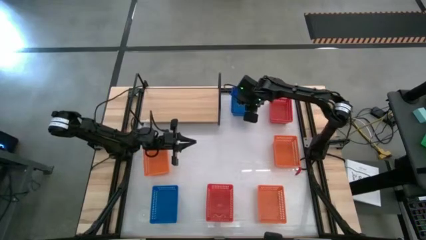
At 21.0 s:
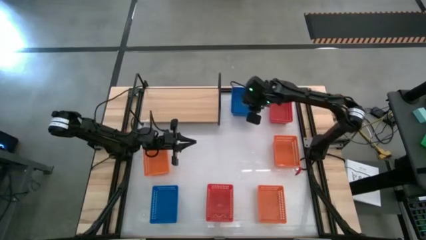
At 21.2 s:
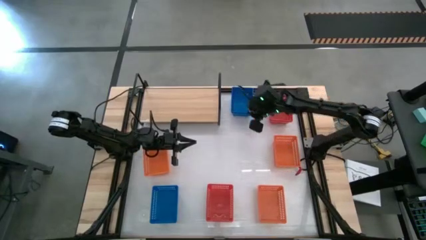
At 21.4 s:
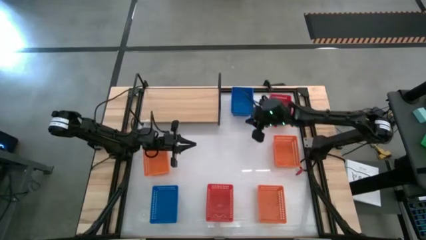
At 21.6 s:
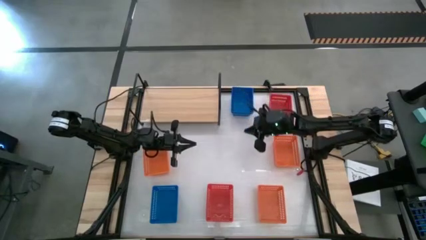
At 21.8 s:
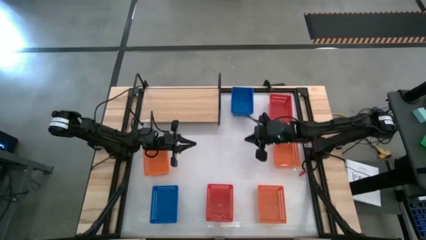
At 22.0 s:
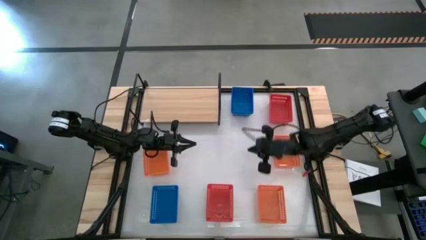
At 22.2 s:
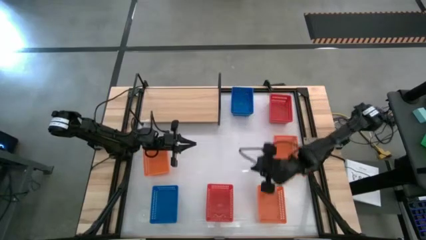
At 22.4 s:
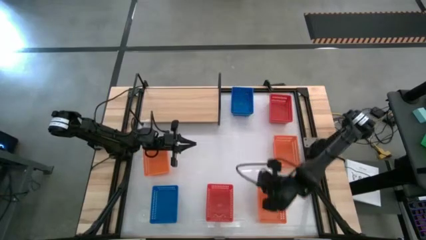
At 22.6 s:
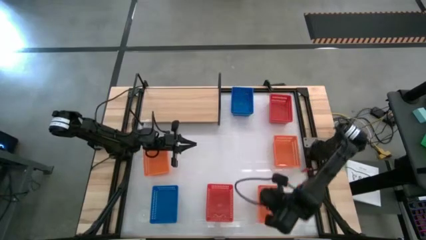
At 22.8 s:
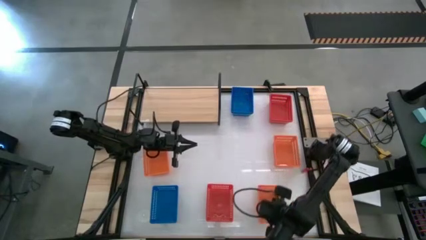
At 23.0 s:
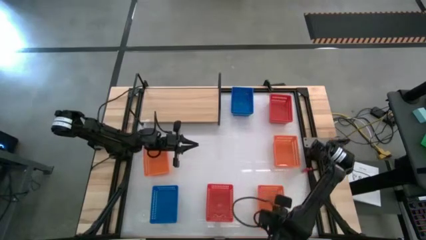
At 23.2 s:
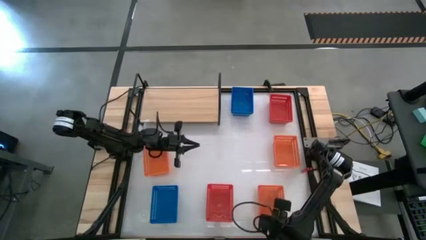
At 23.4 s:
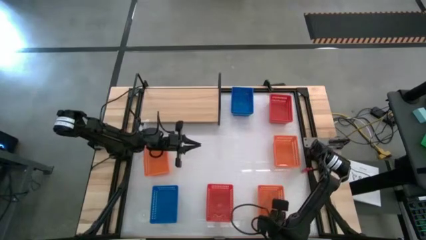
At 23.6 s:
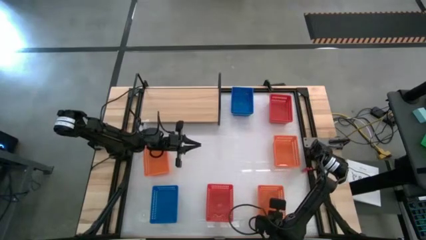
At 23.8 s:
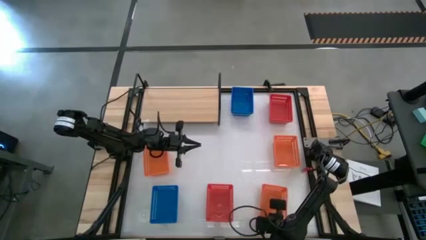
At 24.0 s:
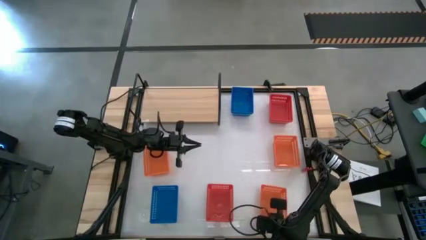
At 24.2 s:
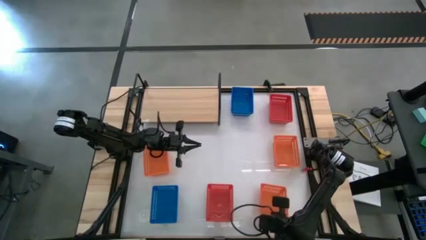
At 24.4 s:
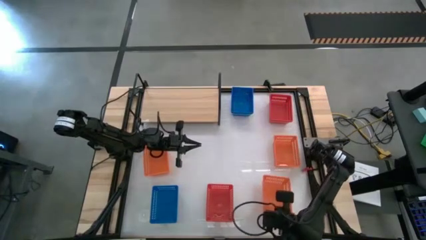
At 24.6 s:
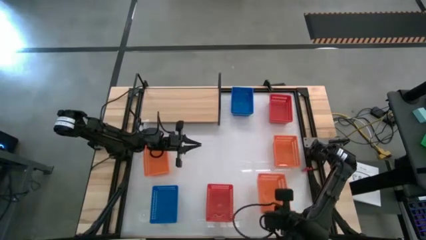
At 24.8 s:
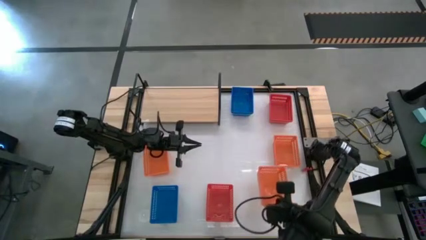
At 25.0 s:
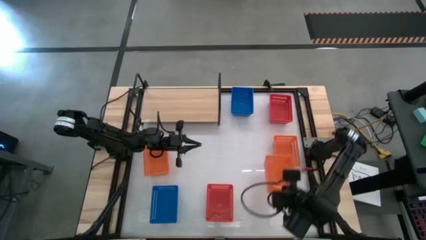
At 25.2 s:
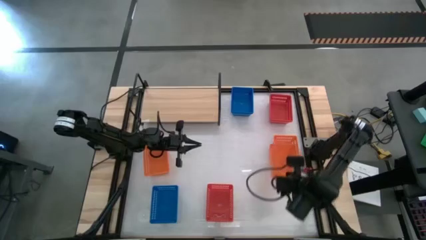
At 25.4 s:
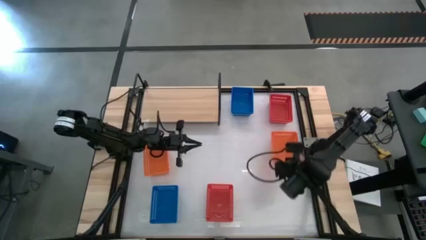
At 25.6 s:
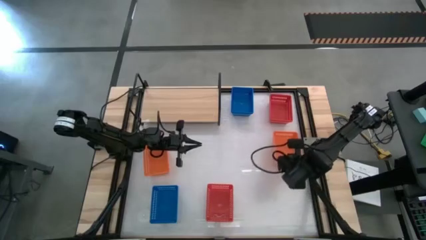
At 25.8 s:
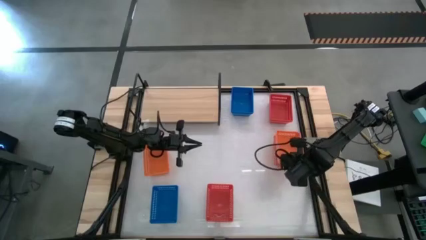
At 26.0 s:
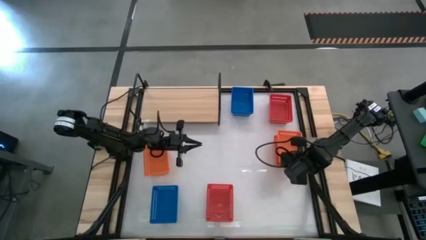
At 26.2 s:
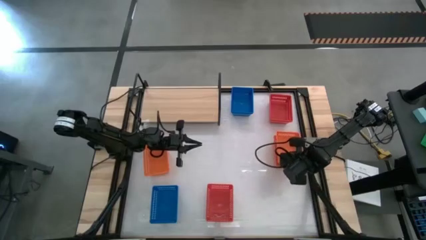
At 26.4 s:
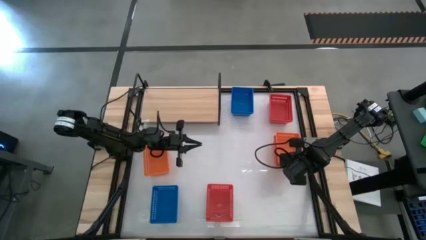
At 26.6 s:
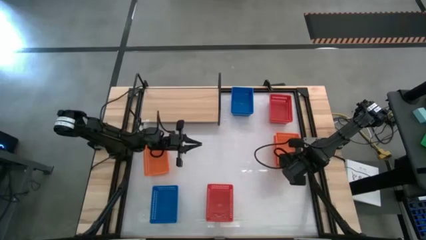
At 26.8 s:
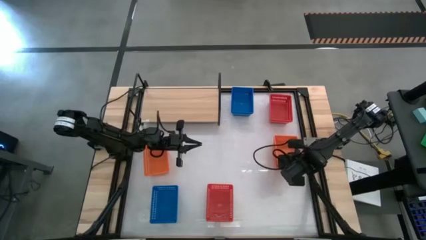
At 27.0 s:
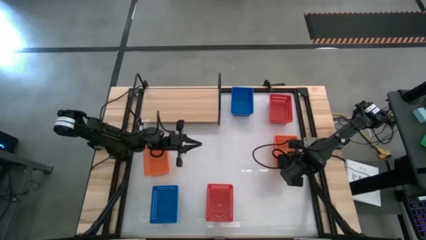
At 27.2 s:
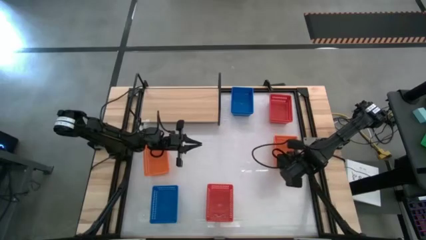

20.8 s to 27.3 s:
Task: Stack baskets on shelf by color
Stack the bottom right orange bin on top of the top right orange bin

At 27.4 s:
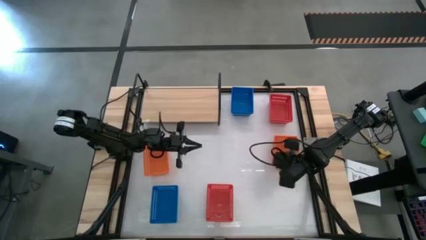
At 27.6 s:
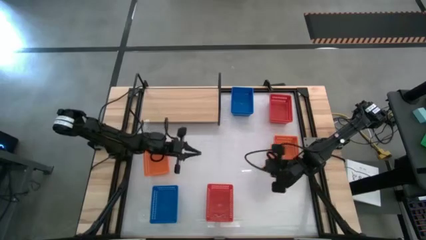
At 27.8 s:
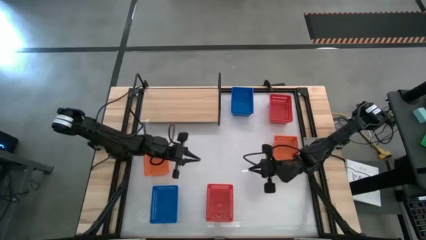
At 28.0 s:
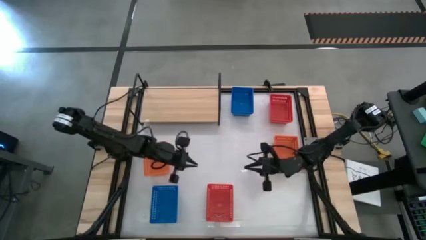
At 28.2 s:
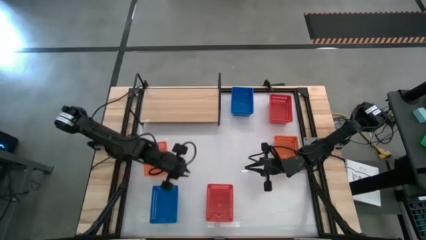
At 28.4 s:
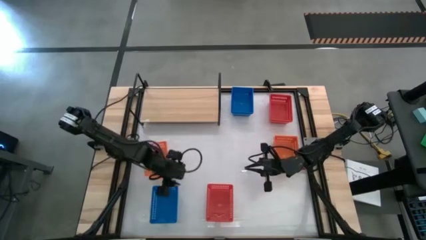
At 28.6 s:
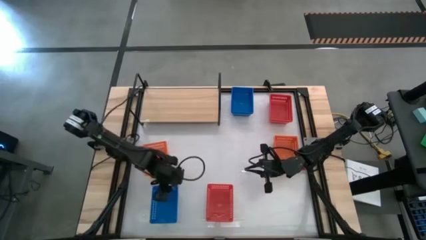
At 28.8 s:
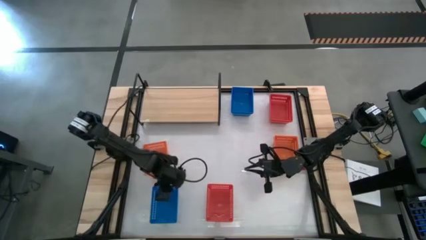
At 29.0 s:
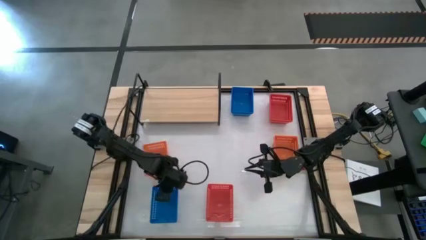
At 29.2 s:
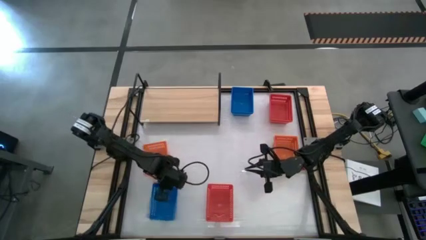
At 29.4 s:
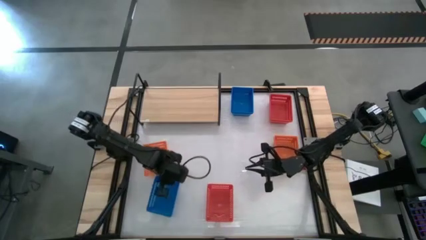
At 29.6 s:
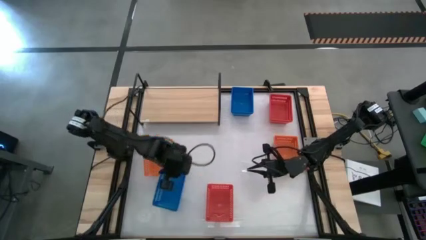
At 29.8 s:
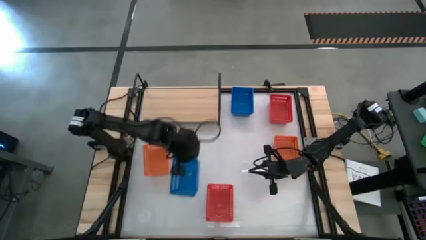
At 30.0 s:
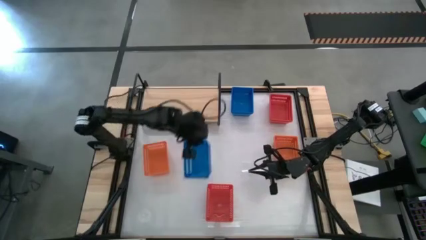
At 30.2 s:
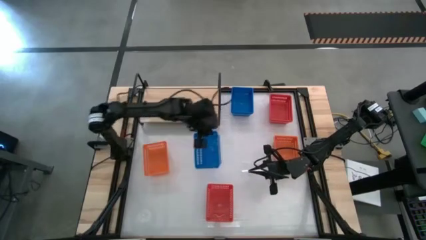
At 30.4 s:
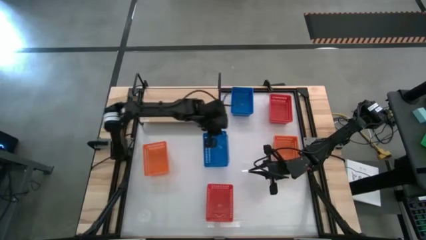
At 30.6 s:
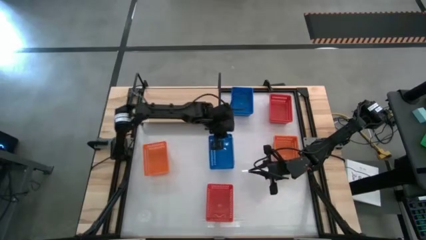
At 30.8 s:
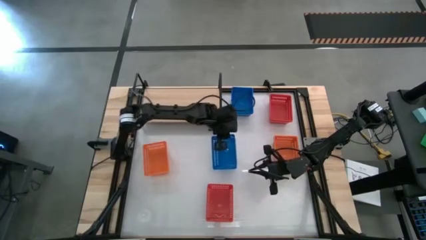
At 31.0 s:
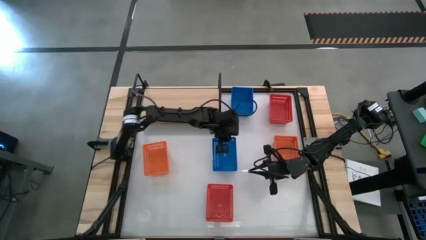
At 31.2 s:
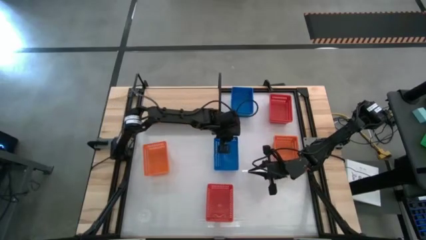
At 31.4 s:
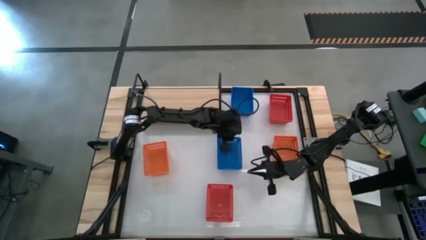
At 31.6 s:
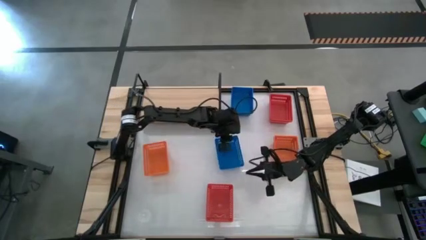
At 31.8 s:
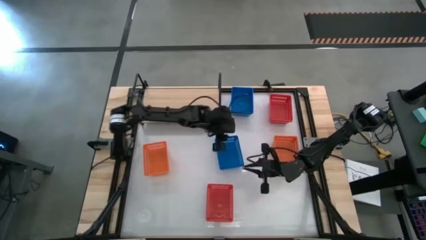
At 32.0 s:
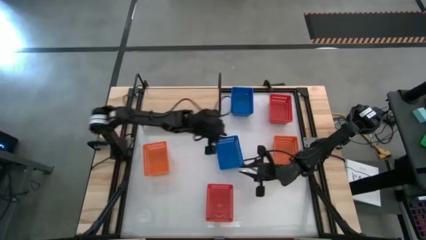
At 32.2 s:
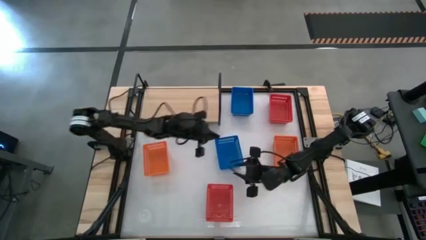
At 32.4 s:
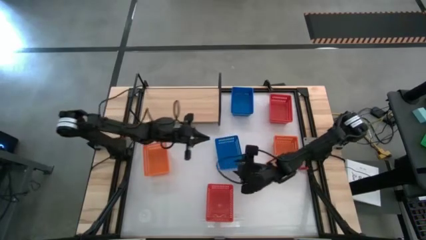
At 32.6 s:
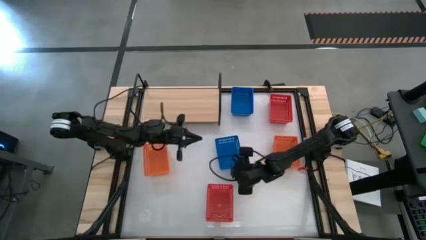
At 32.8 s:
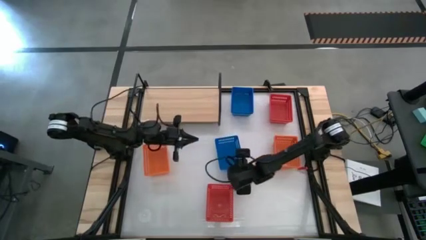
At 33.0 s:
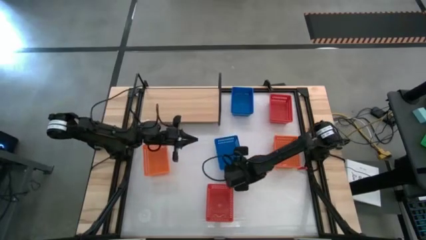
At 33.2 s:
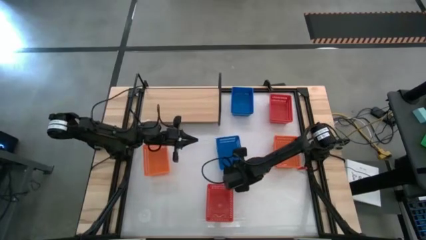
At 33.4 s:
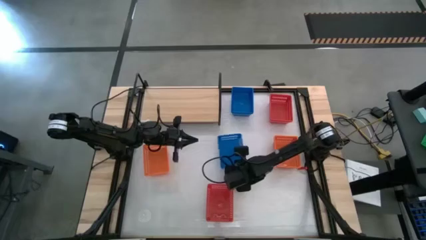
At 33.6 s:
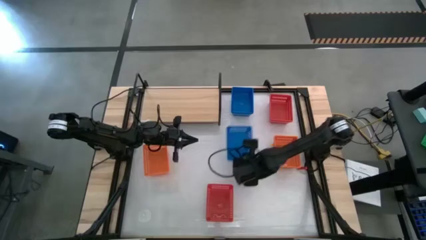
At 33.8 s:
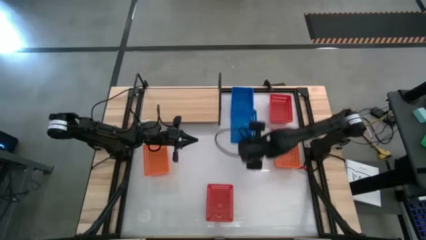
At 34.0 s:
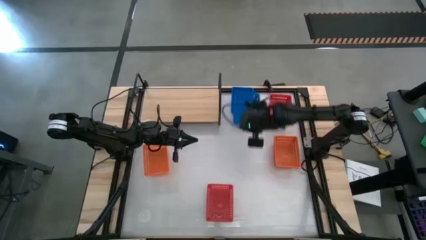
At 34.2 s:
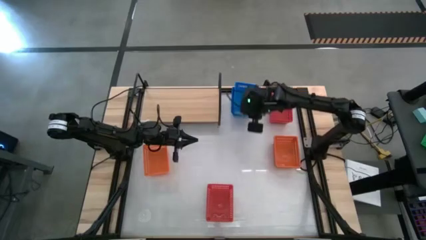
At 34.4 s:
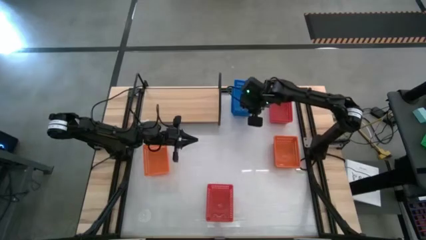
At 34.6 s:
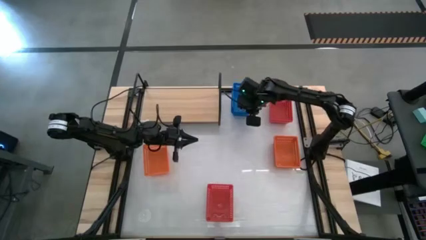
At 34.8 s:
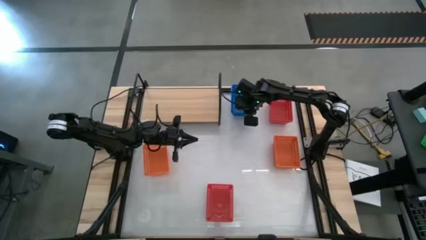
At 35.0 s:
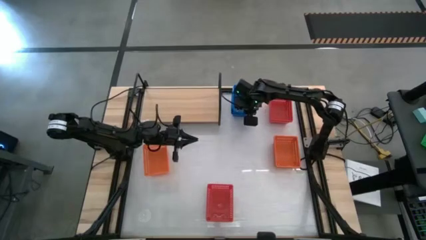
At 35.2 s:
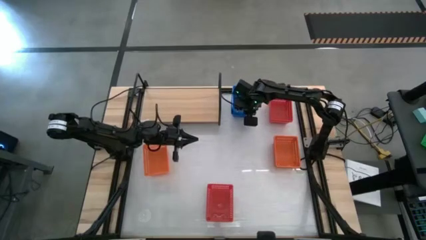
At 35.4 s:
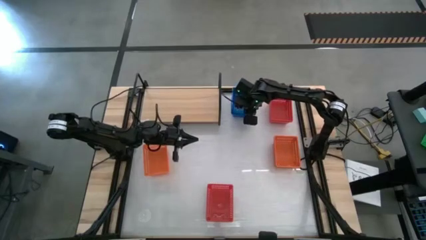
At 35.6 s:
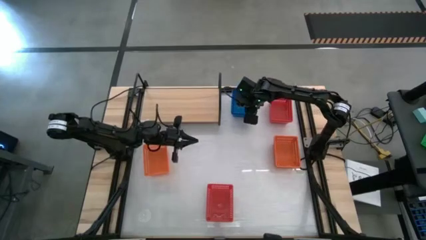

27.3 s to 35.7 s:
Stack the bottom blue bin on top of the top blue bins

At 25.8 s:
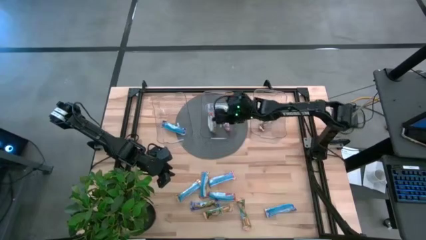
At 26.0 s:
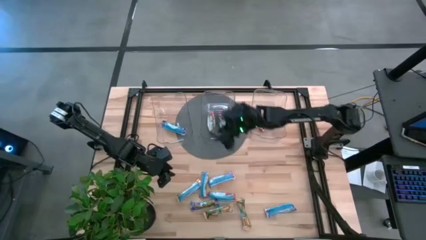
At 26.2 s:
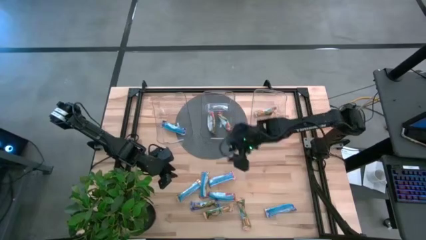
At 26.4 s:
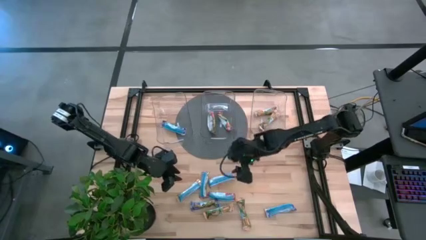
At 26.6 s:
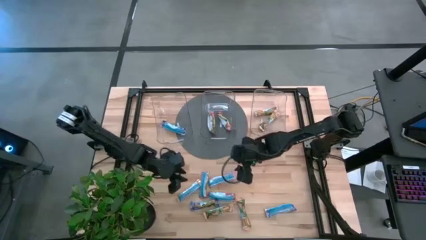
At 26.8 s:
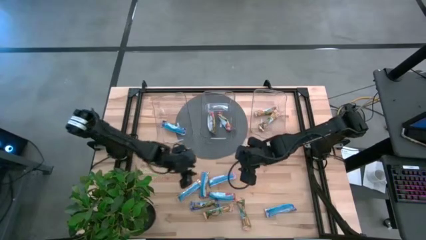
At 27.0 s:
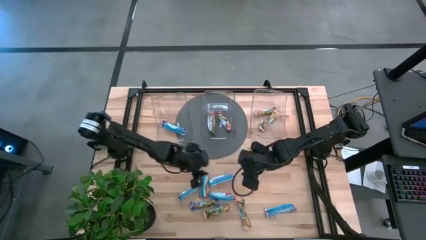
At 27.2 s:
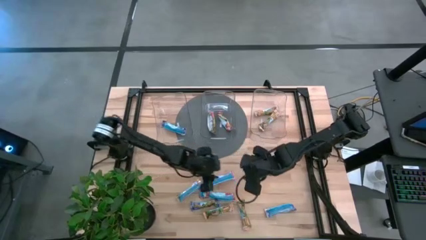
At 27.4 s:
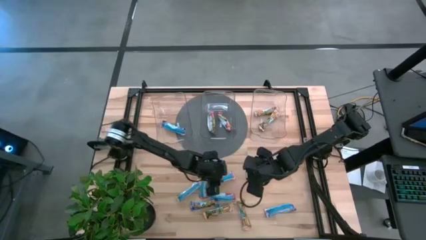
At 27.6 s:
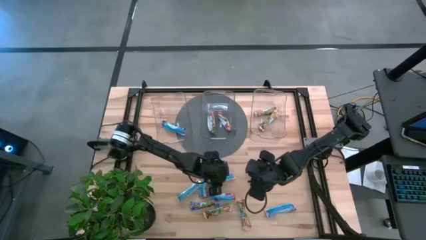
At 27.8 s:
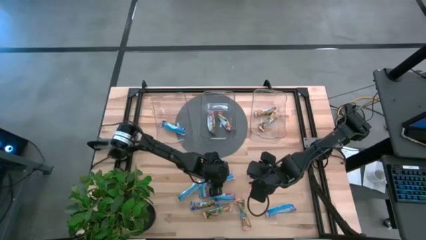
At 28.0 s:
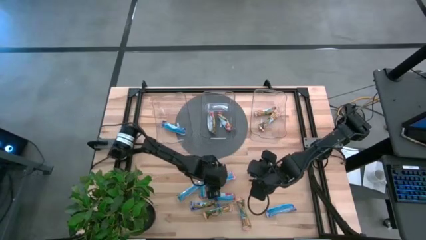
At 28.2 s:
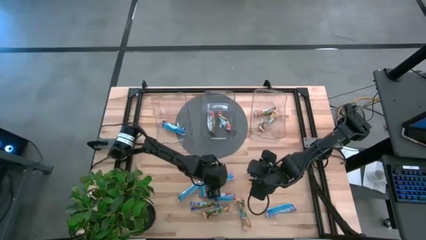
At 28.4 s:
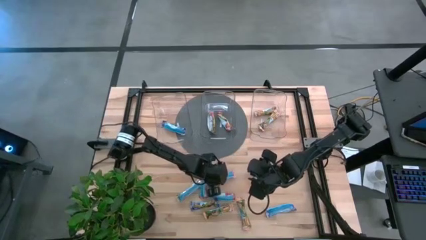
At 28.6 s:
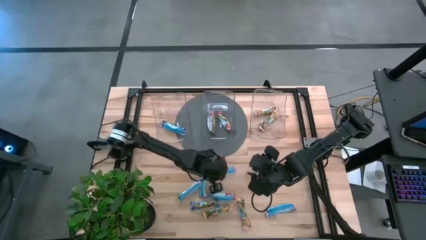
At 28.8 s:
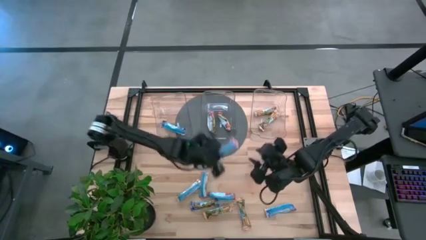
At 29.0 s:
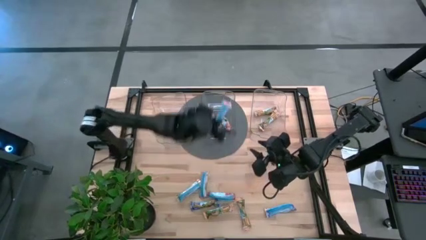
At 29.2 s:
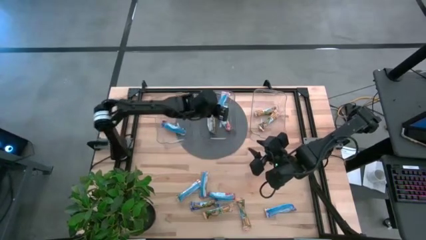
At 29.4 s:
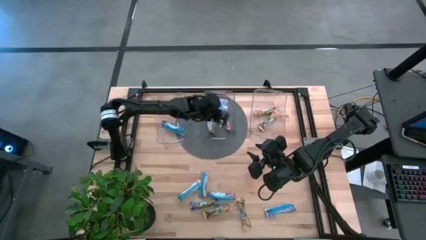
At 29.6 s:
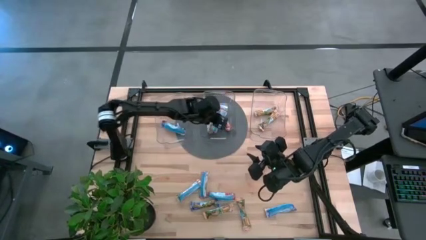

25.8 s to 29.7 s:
Task: Pick and place Granola Bars by type
Put the red granola bar into the middle transparent bin
